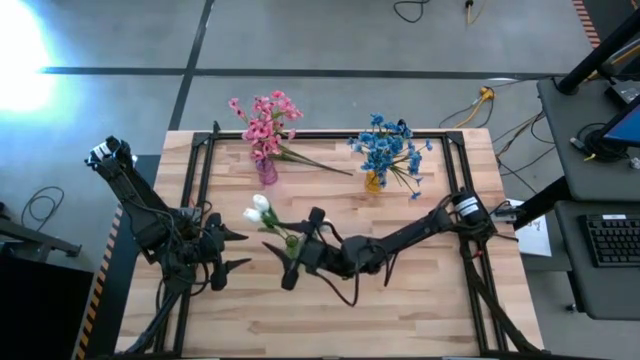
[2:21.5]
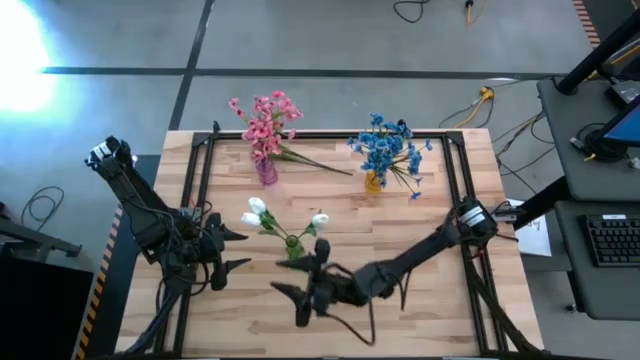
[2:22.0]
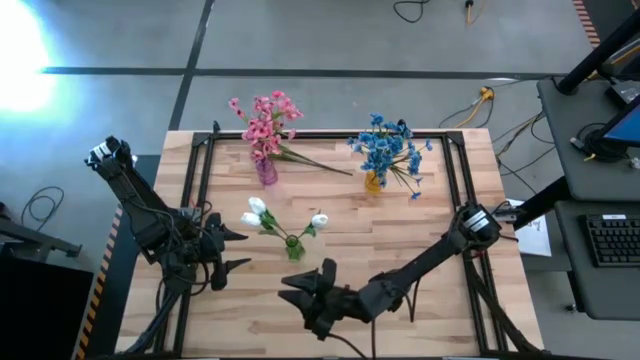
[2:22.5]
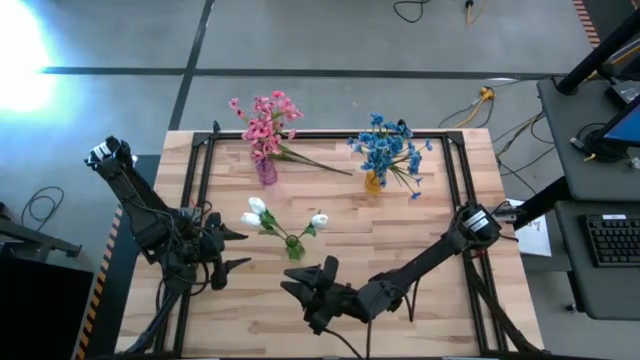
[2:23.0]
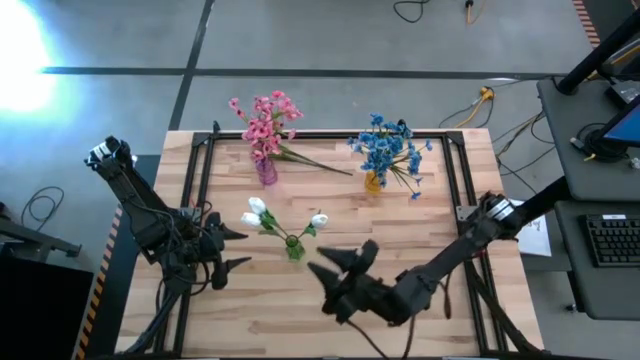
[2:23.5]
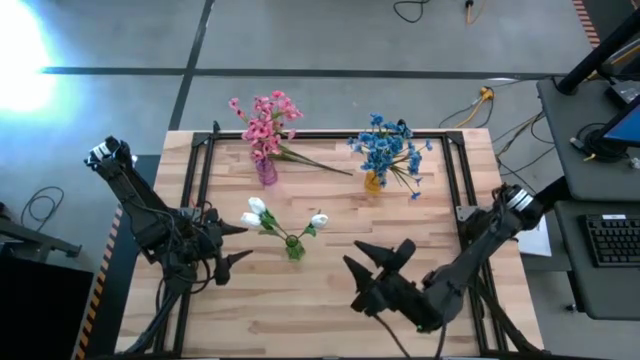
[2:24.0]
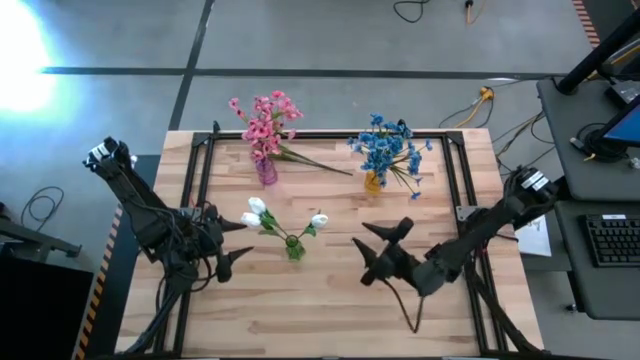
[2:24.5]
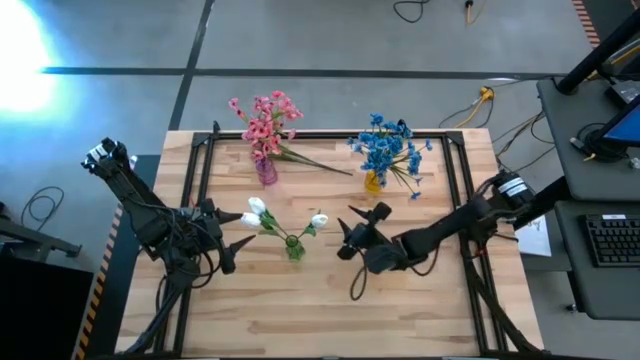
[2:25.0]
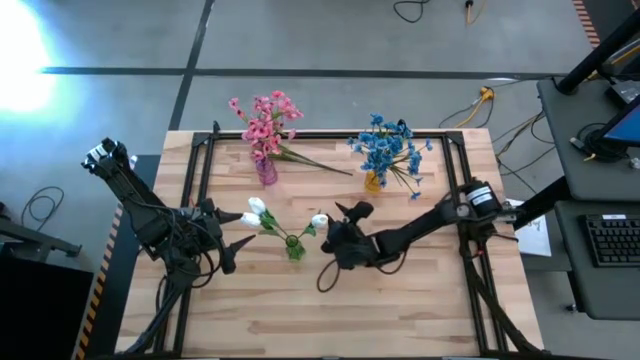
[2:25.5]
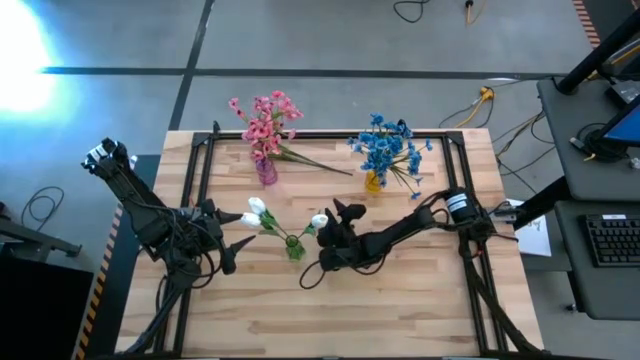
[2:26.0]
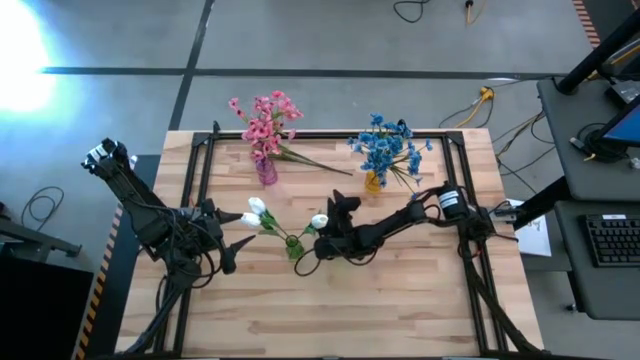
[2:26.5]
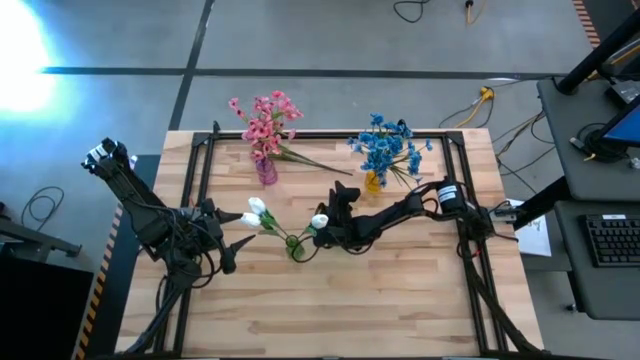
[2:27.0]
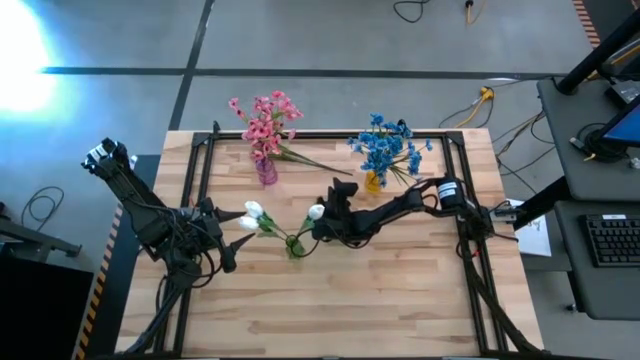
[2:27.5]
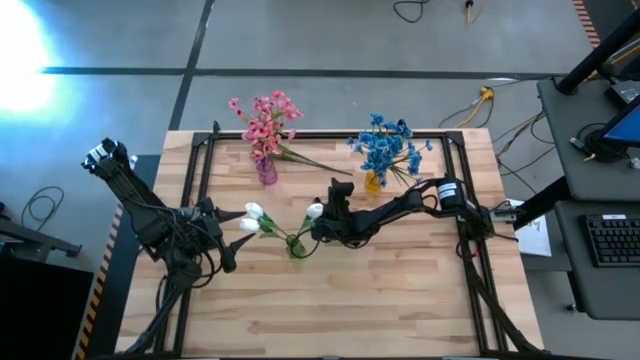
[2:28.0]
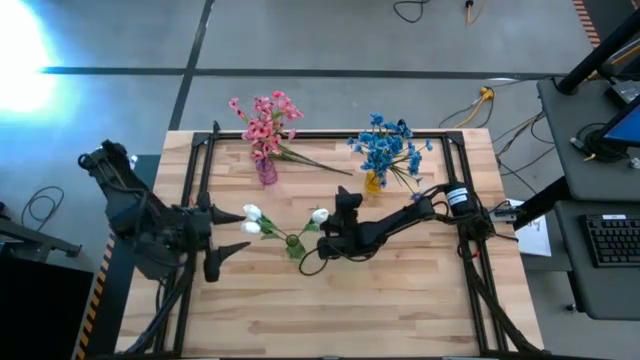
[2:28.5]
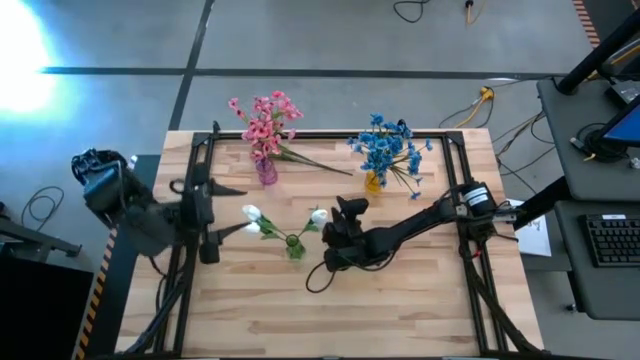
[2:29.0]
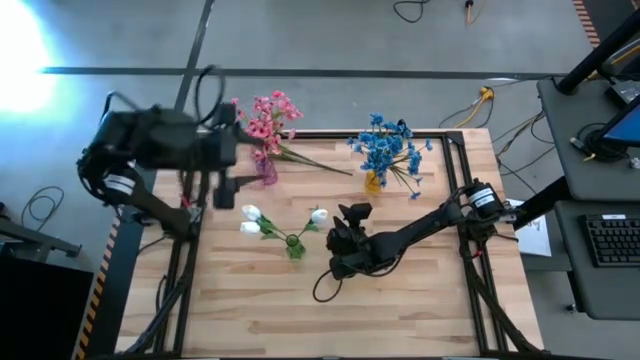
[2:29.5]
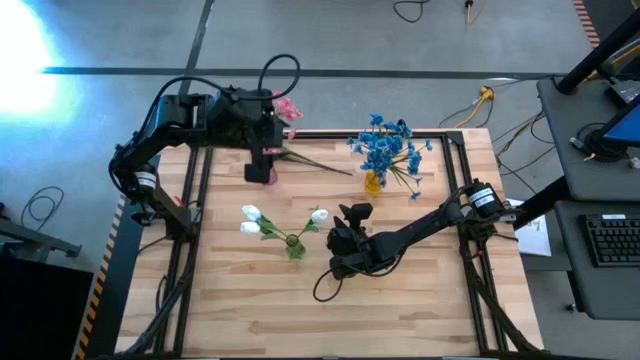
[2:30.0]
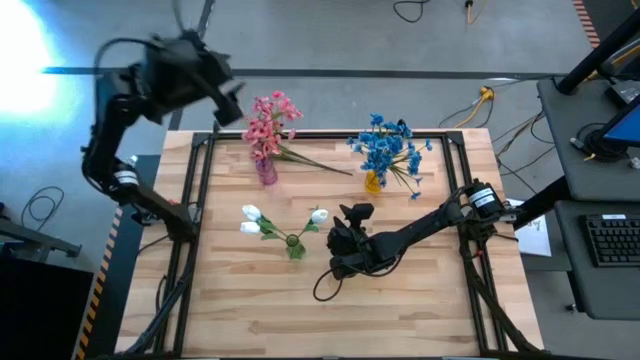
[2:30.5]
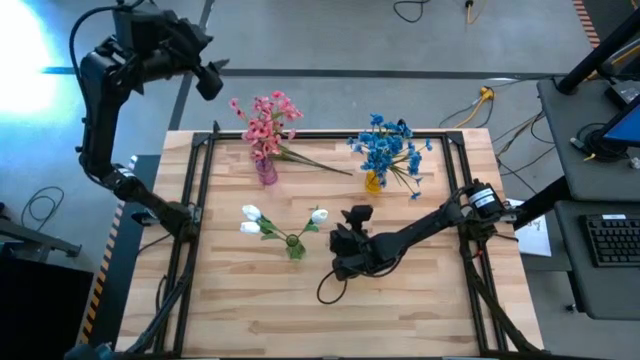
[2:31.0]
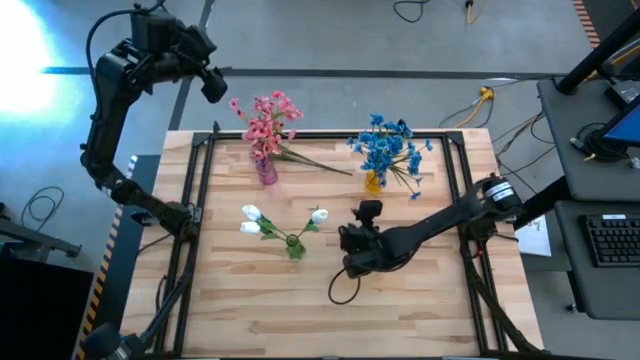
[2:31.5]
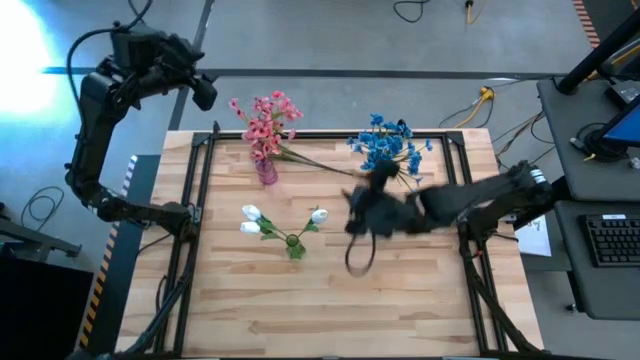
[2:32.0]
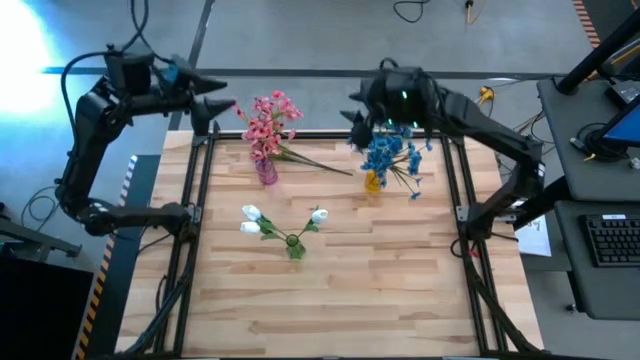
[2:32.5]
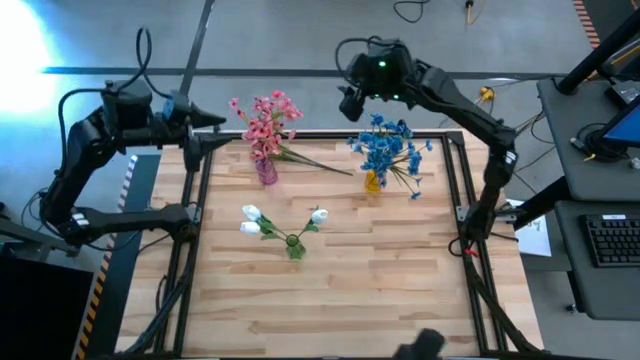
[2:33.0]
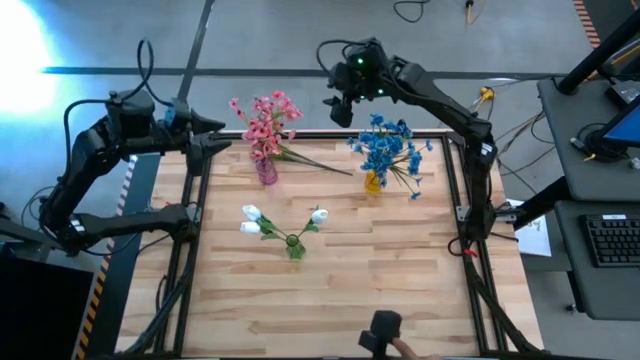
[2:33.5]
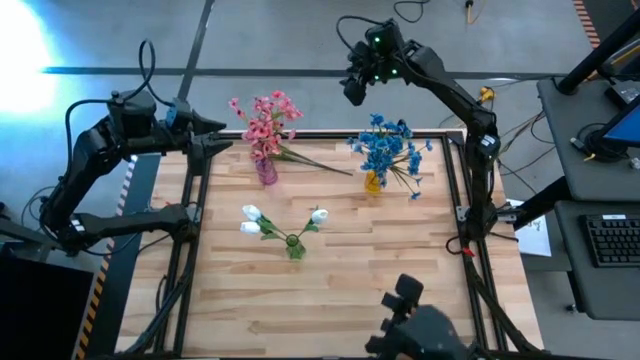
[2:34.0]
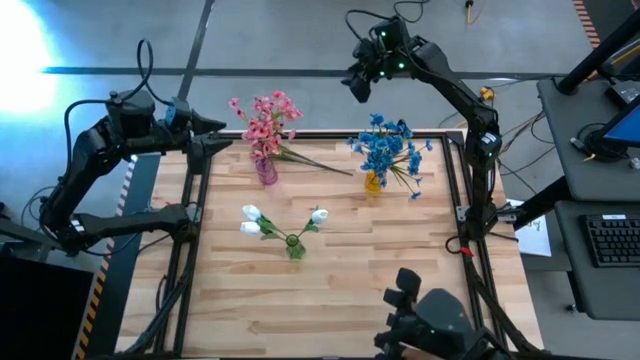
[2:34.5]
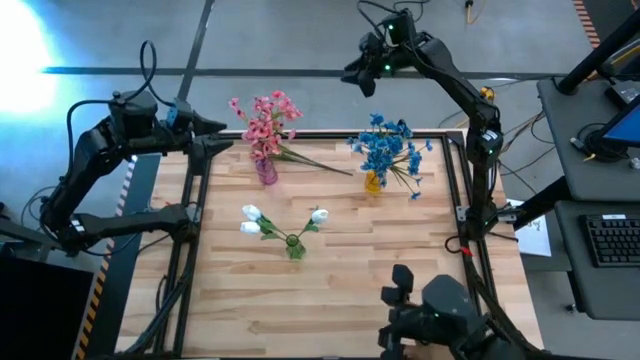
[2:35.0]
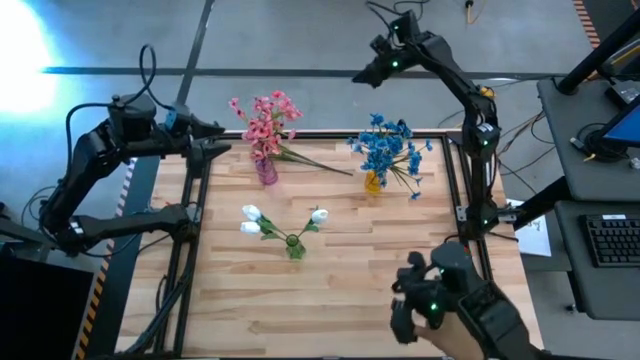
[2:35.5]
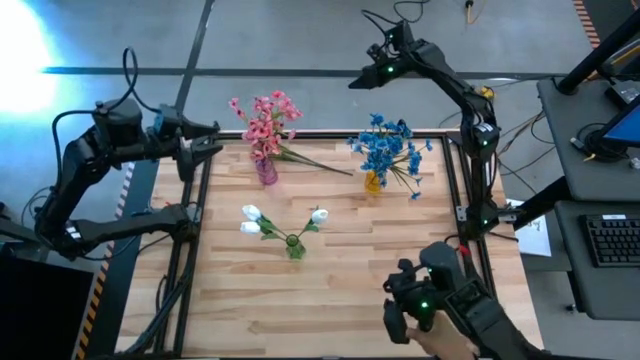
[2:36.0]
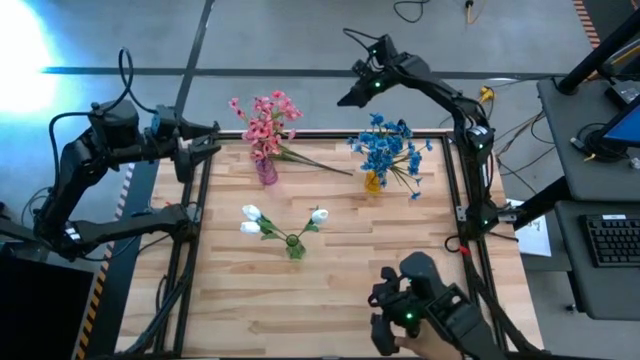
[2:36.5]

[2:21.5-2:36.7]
Task: Sort flowers into vase by color
Put the pink flowers into the pink vase

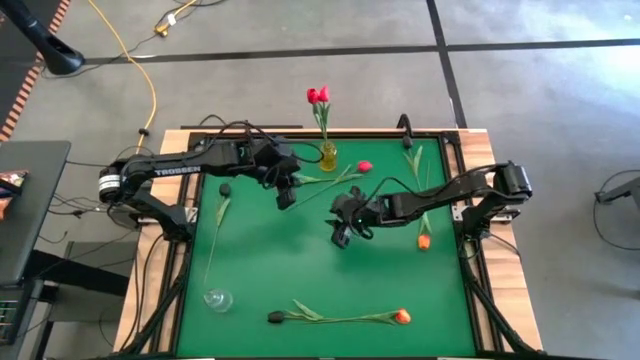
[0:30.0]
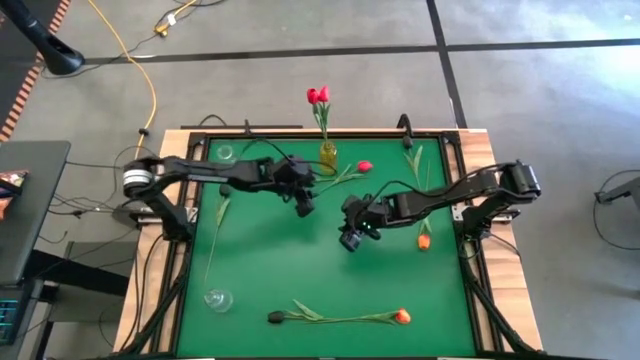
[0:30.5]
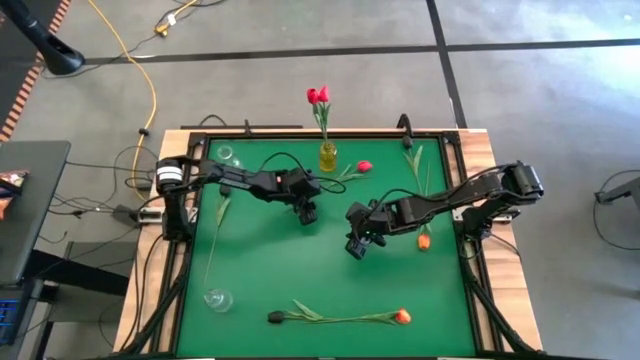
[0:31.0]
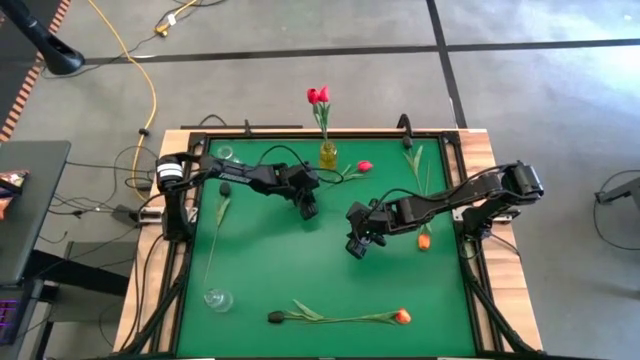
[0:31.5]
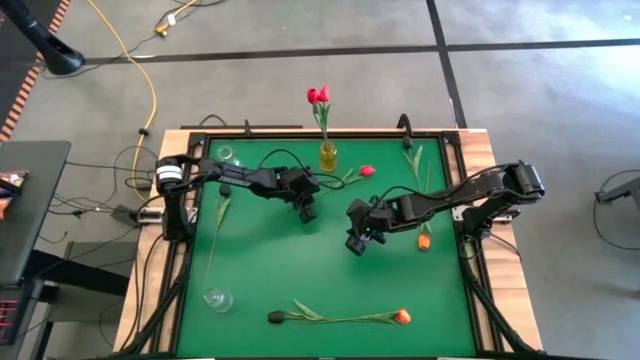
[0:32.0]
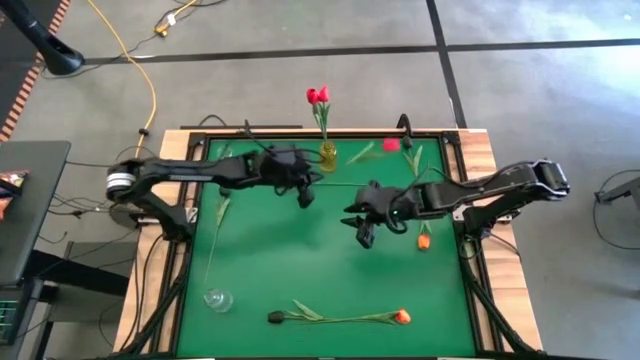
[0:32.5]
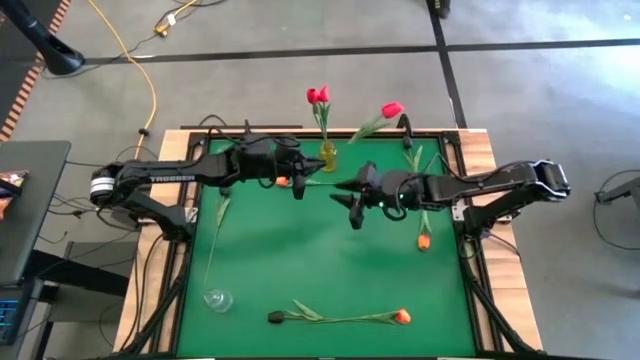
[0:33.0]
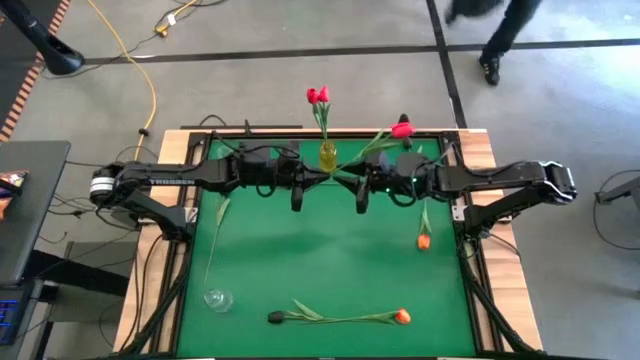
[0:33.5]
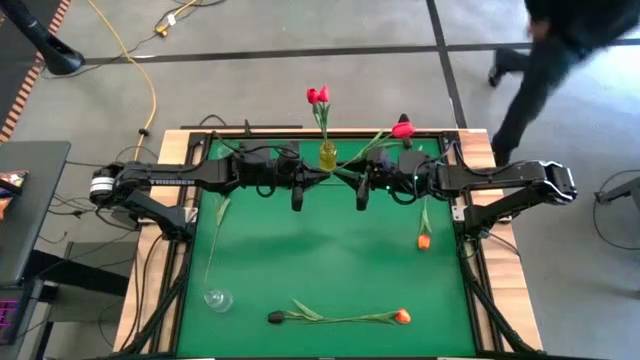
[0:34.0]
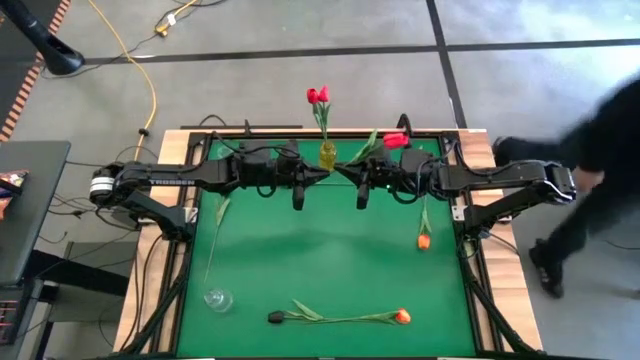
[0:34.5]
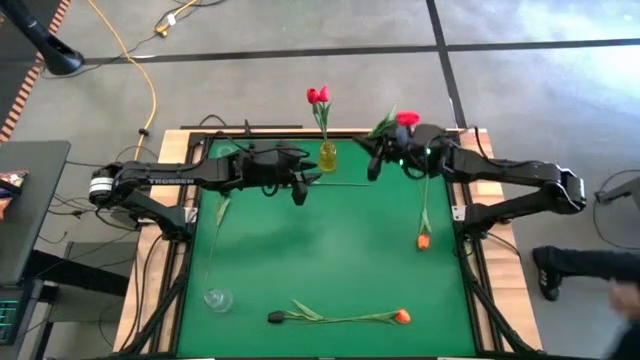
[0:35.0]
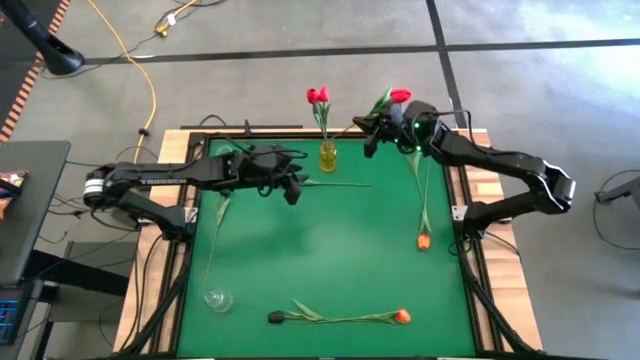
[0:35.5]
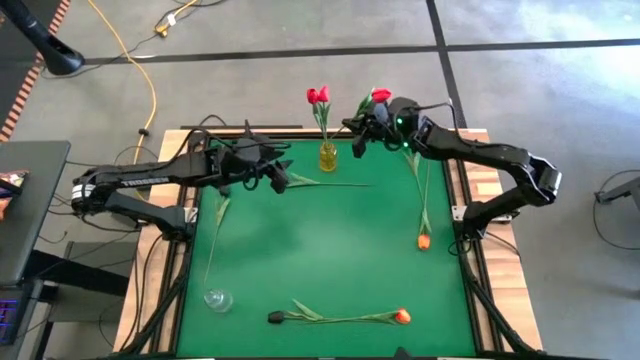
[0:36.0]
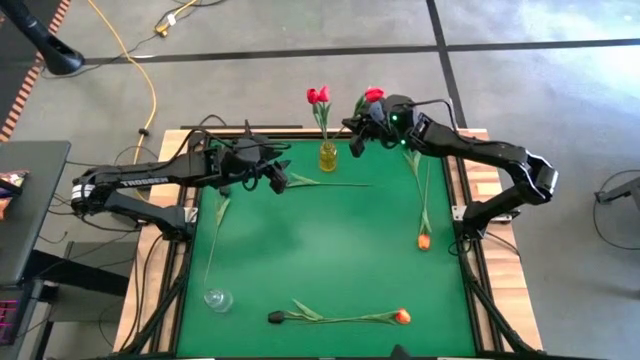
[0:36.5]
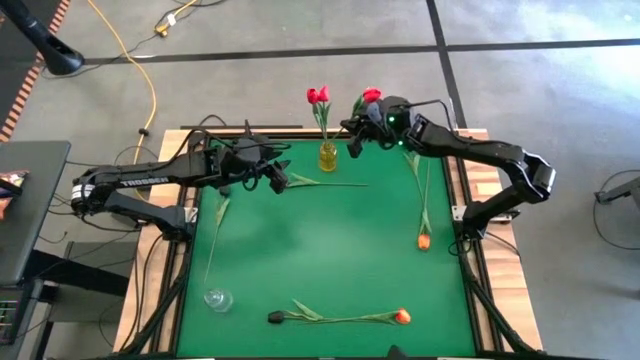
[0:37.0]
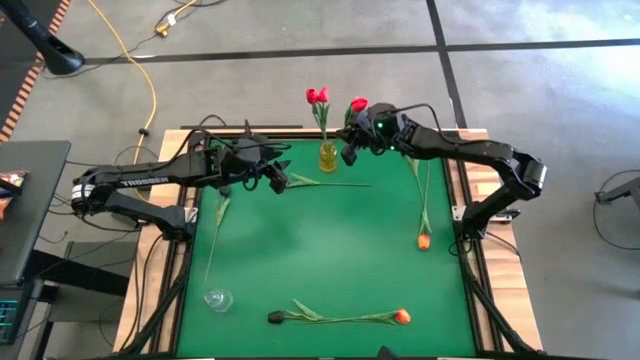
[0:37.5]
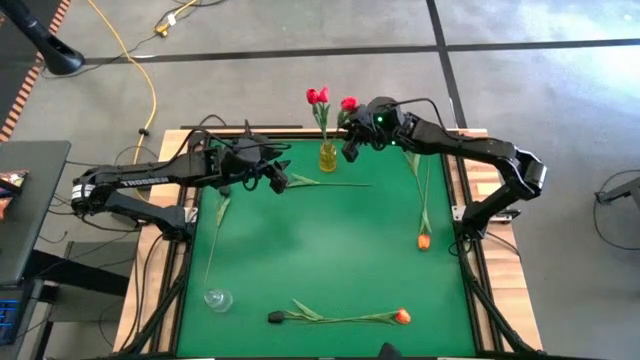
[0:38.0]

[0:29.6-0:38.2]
Task: Sort flowers into vase by color
Put the red flower into the yellow vase
